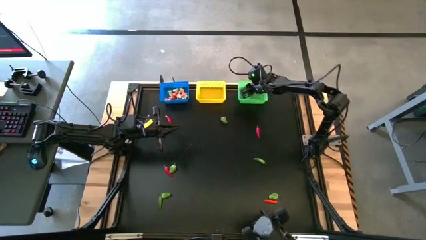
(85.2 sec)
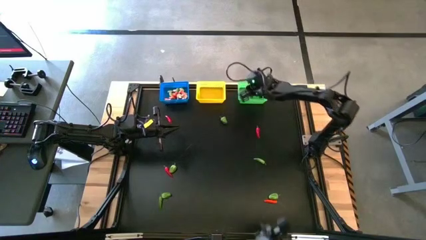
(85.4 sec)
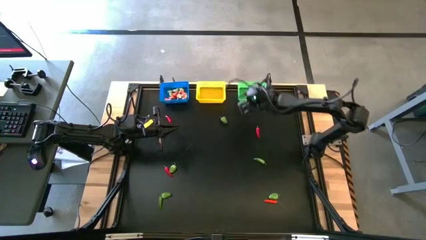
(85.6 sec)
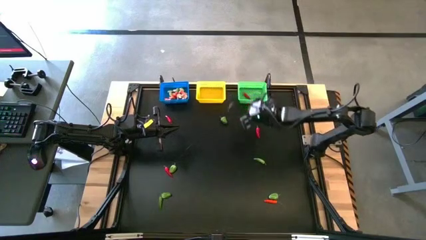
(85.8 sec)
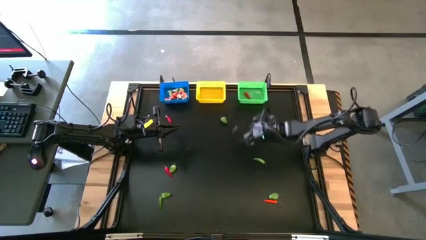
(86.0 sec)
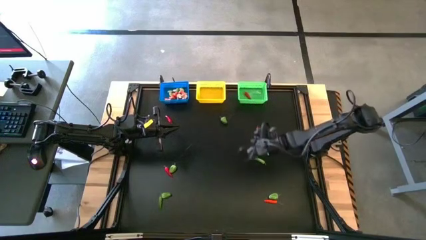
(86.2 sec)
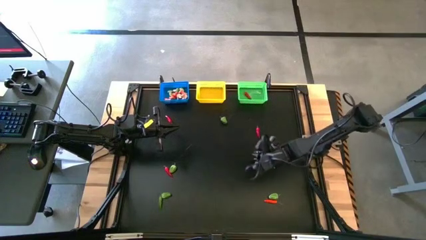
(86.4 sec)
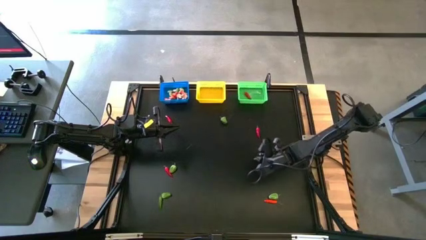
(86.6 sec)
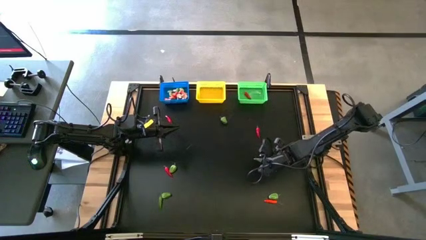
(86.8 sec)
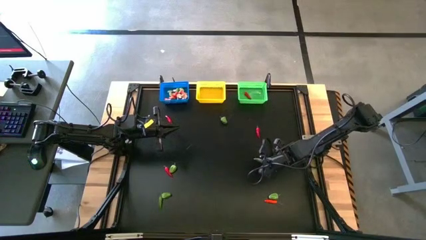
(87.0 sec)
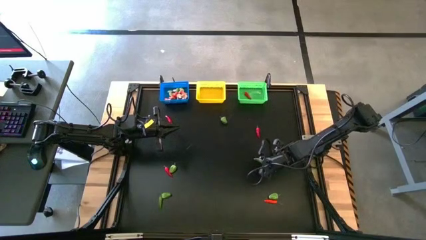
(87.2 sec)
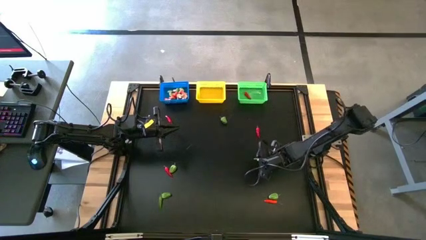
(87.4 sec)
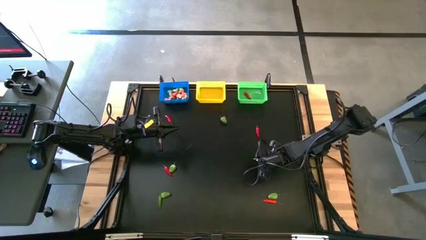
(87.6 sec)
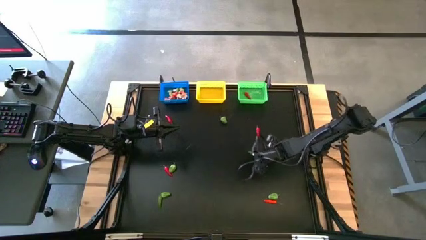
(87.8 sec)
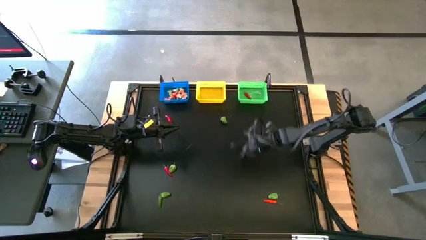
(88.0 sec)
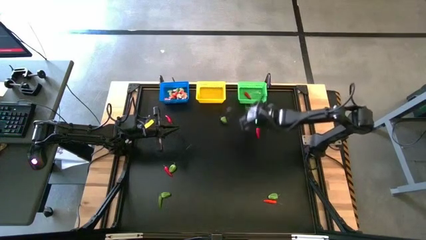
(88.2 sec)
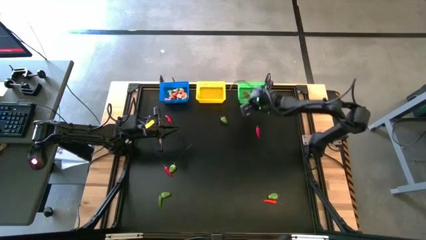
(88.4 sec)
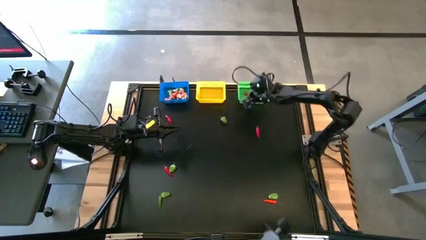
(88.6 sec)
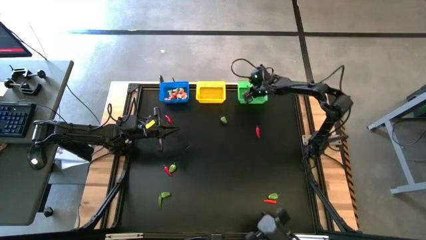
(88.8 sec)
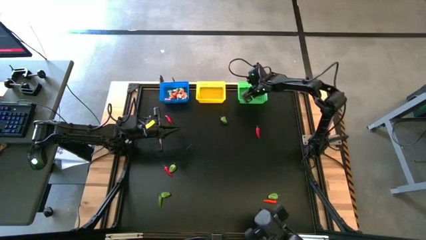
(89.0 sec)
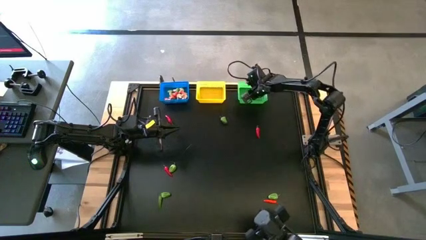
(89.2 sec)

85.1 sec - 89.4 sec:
Task: Sort produce into baskets
Put the green chili pepper into the green bin

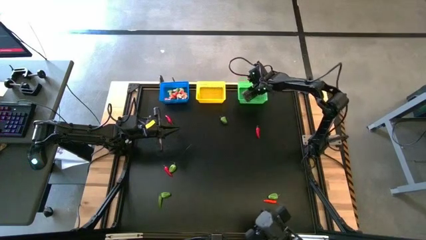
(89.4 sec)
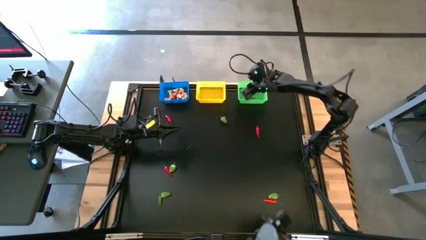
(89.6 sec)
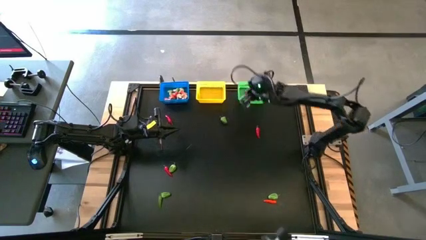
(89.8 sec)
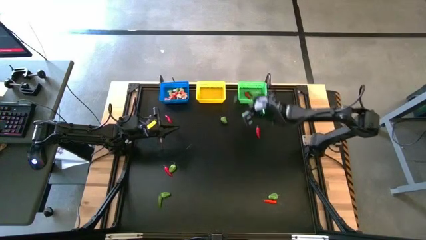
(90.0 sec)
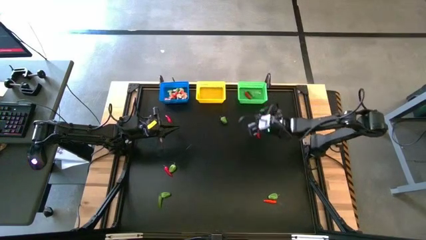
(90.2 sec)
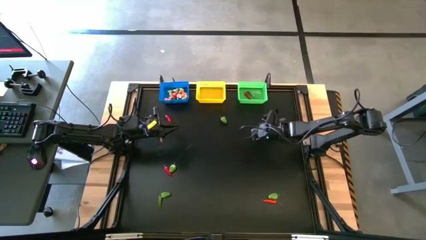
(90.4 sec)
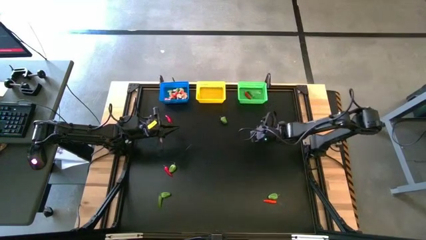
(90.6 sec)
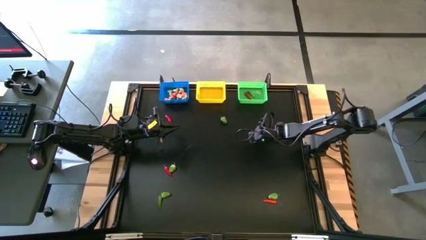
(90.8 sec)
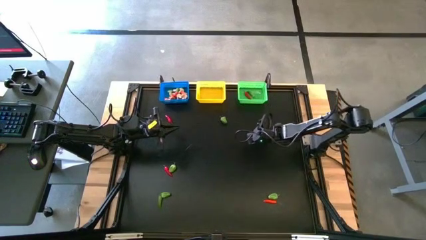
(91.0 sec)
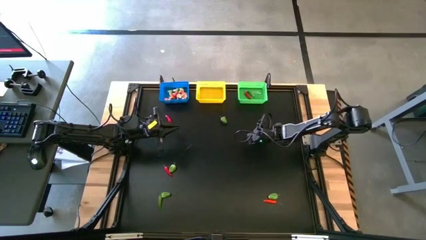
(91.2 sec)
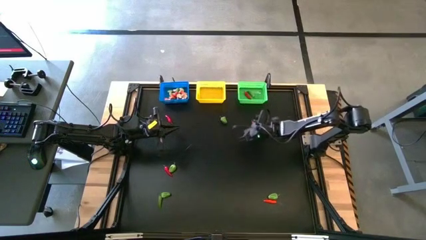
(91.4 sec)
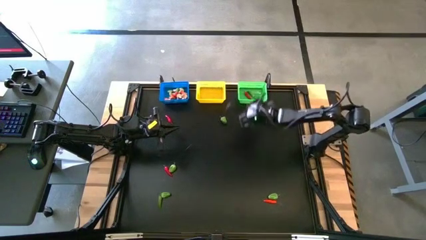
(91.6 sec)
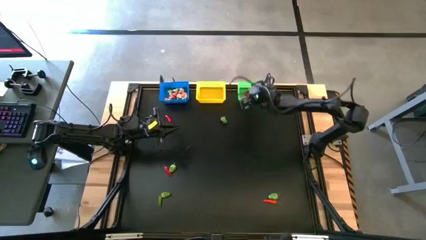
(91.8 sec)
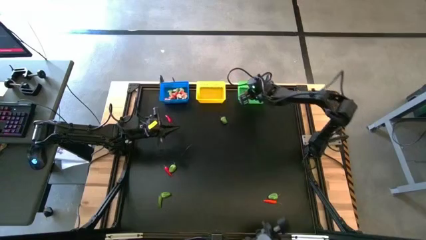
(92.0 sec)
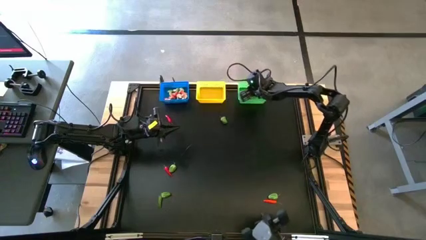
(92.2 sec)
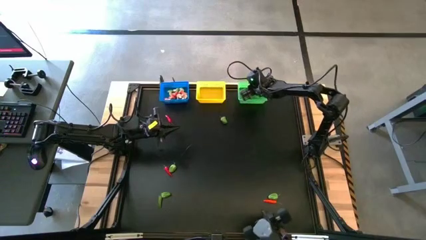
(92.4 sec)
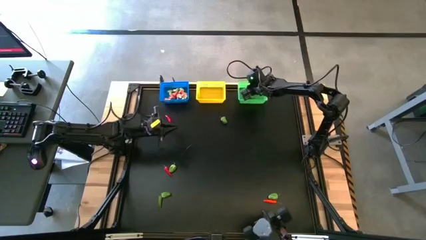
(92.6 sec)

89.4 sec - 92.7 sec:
Put the red chili pepper into the green bin

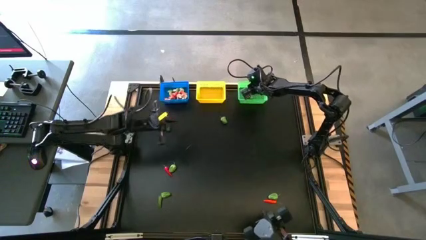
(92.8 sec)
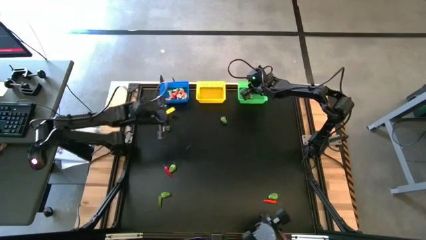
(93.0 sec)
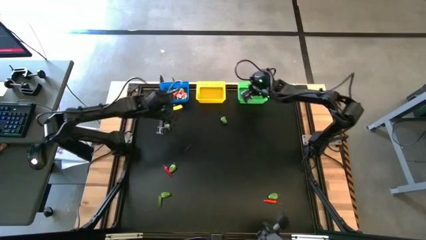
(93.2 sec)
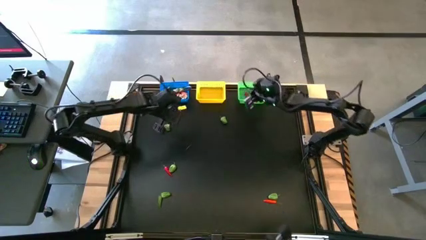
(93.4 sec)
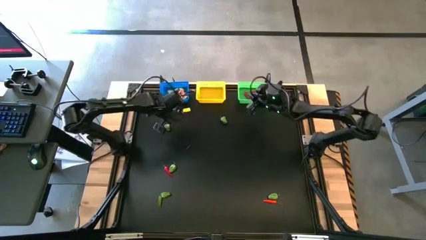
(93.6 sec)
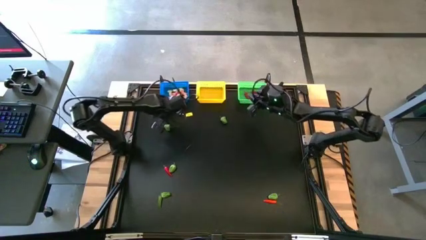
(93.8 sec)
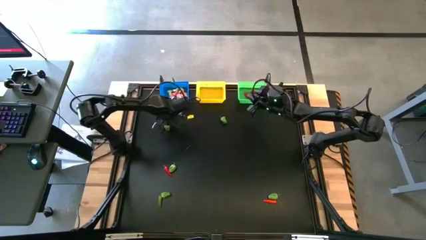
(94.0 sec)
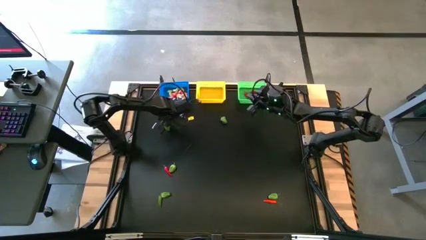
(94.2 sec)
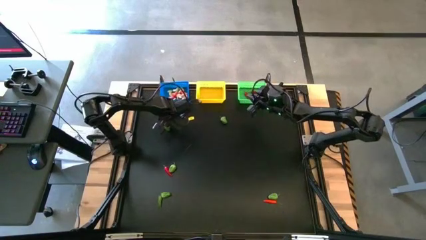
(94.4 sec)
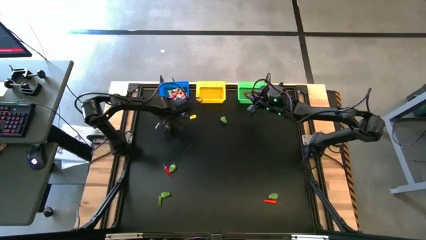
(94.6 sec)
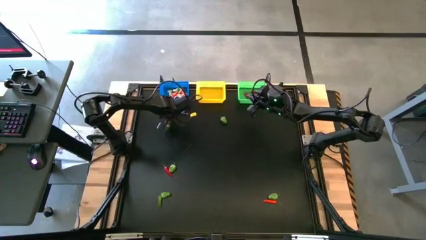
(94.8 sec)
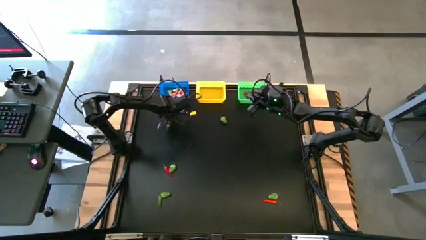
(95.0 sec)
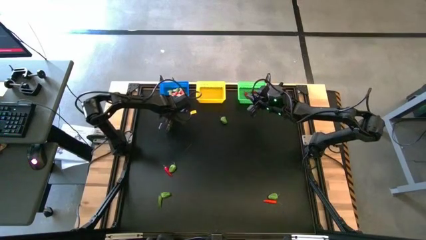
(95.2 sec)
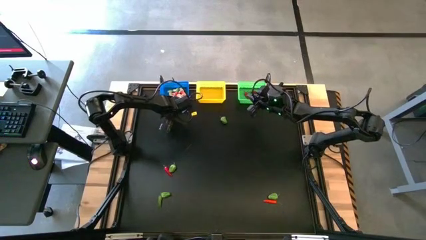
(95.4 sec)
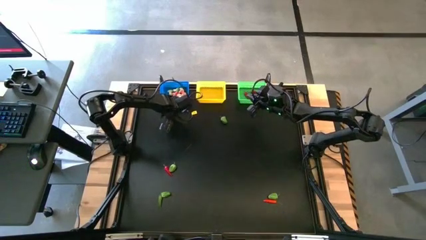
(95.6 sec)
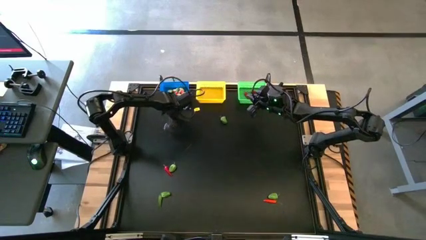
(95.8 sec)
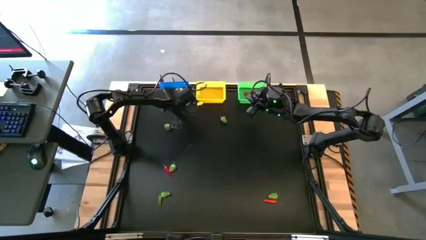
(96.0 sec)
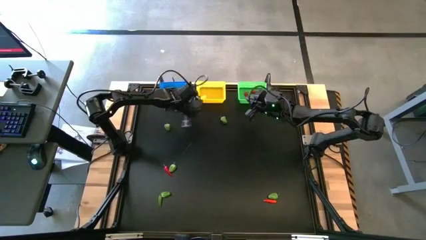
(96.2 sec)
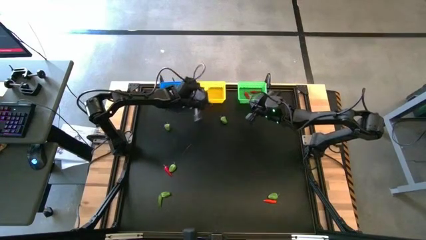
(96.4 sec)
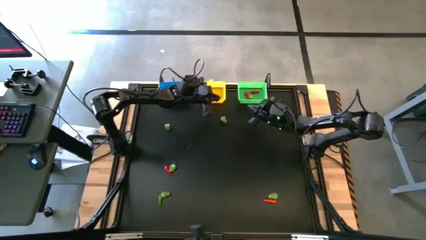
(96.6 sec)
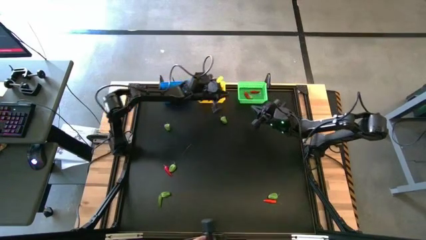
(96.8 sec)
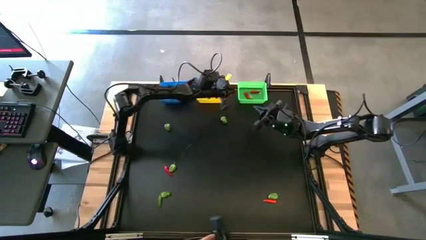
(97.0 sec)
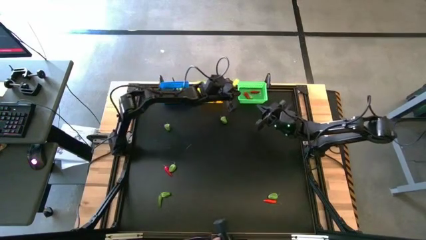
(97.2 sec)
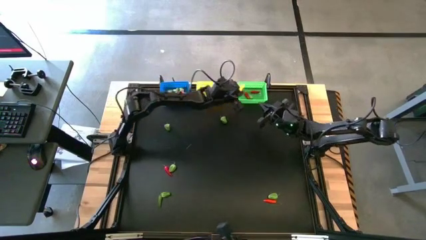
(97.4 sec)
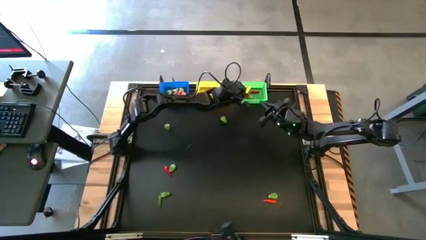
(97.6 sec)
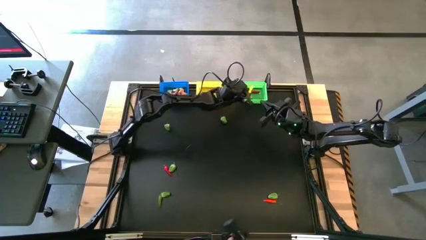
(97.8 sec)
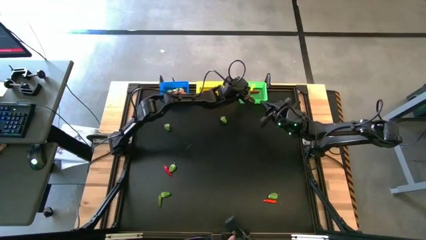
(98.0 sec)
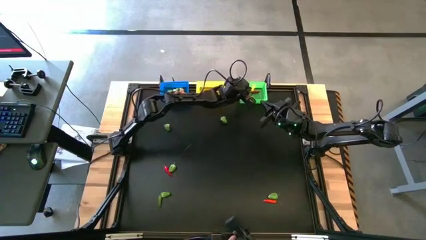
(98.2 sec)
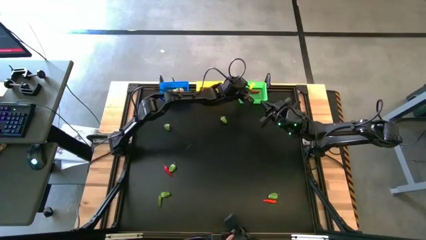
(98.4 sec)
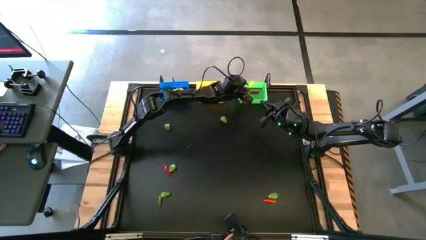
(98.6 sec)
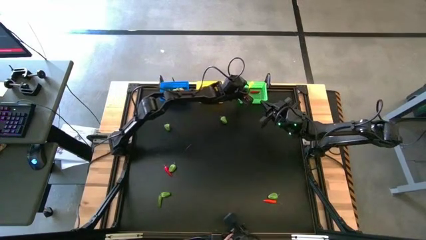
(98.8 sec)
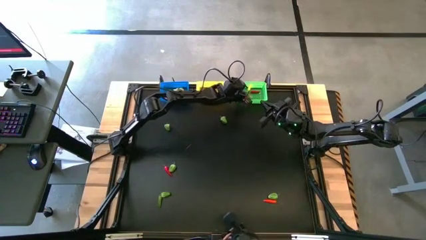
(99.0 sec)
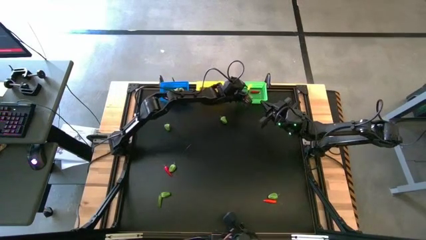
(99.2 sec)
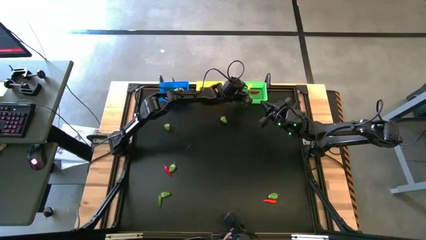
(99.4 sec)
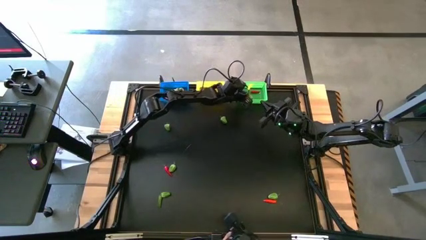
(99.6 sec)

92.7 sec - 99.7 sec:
Put the red chili pepper into the green bin

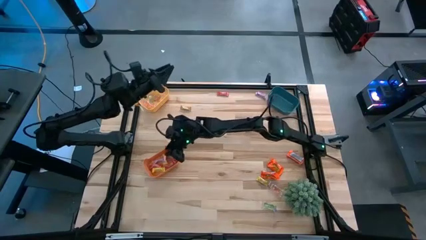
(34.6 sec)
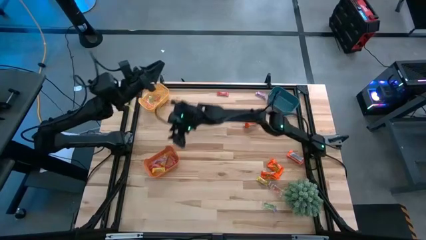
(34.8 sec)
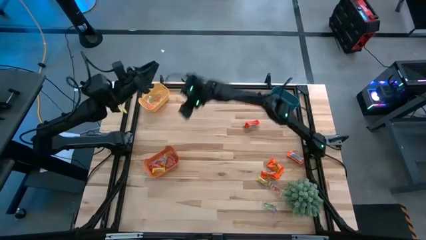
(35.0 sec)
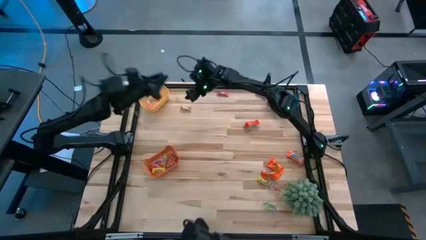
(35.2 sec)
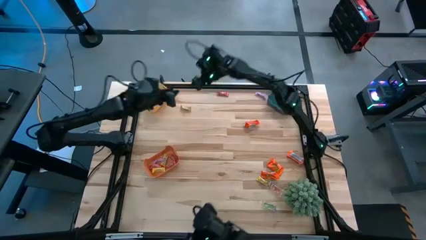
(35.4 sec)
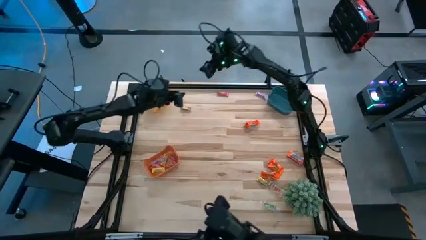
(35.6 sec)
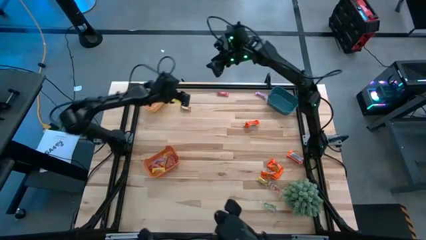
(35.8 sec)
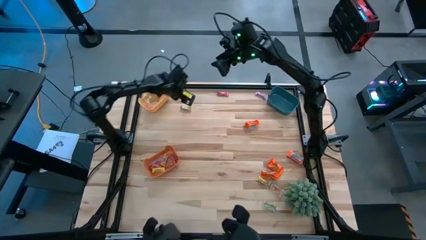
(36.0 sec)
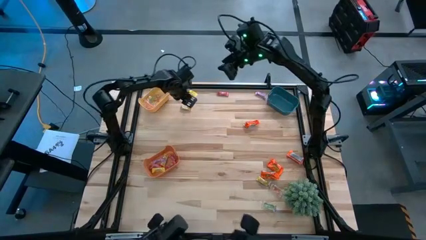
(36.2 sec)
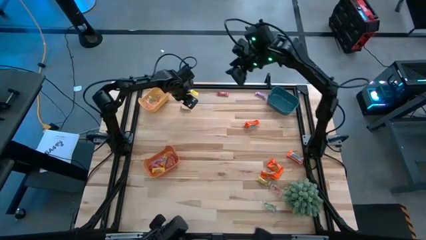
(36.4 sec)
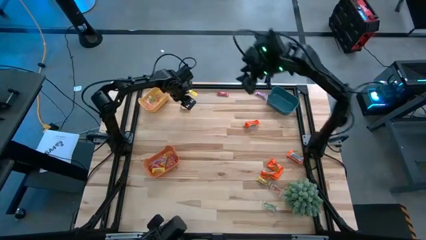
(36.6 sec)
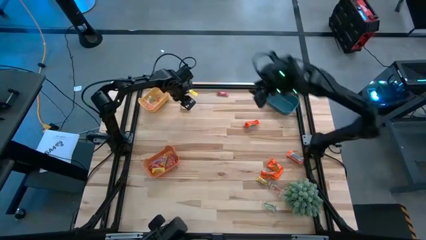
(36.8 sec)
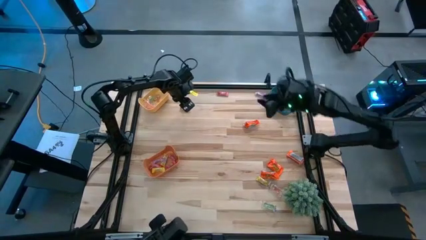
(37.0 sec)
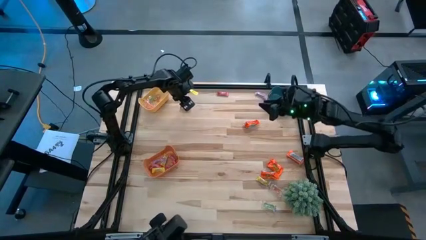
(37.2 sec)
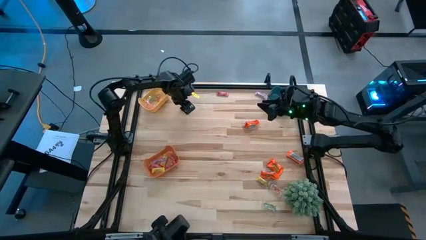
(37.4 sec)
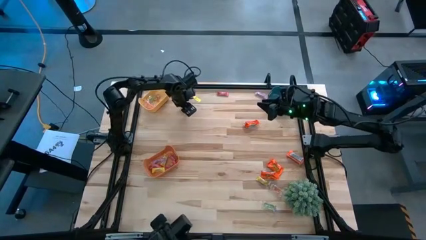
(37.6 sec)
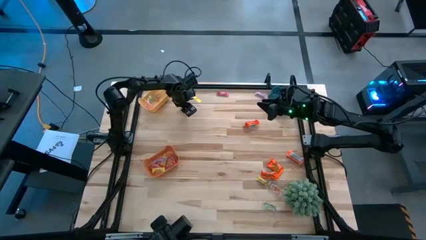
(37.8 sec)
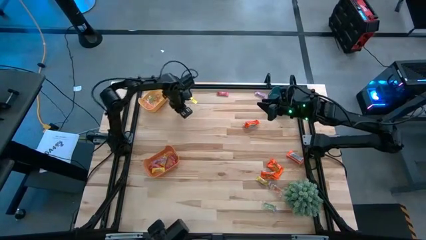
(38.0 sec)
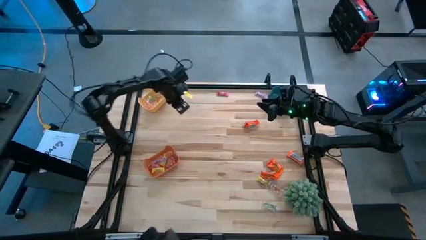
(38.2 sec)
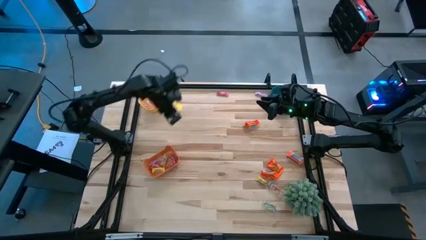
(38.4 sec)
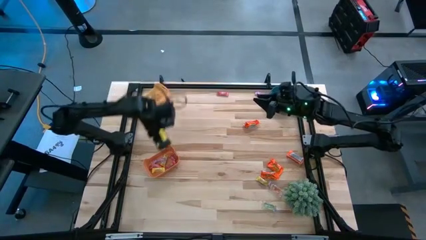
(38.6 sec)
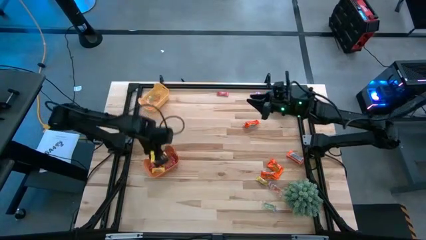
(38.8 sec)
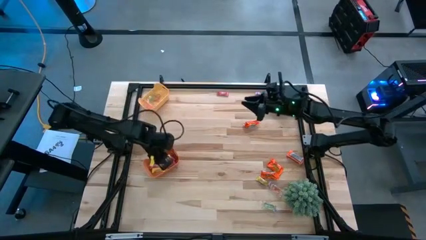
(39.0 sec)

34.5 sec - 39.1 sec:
Task: Sort candy
Put the top yellow candy into the orange bin
